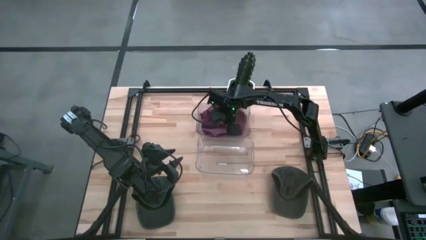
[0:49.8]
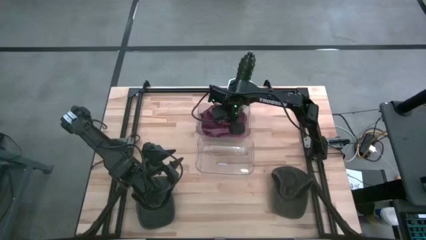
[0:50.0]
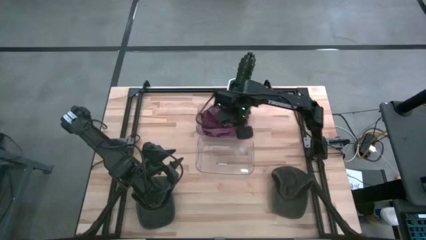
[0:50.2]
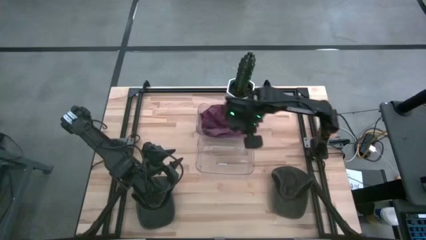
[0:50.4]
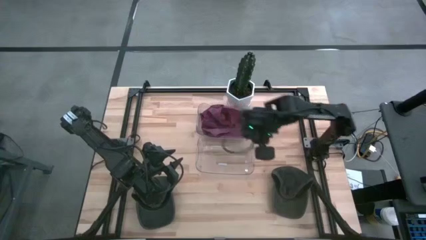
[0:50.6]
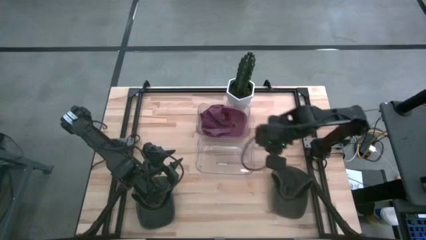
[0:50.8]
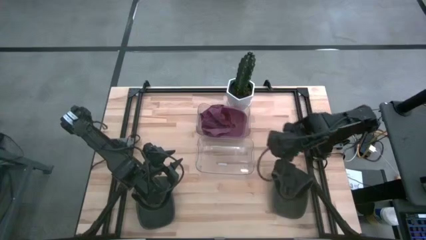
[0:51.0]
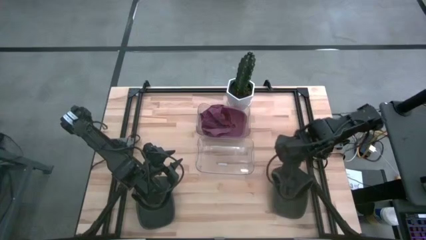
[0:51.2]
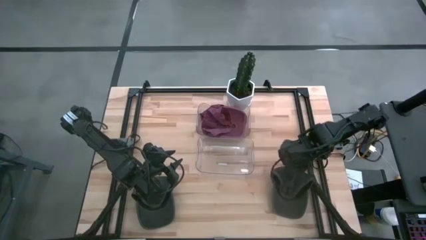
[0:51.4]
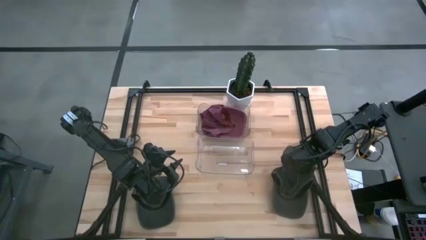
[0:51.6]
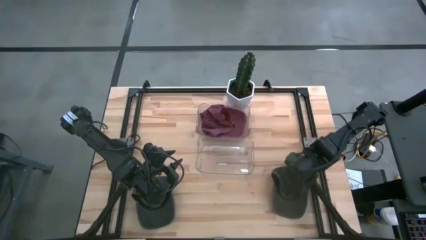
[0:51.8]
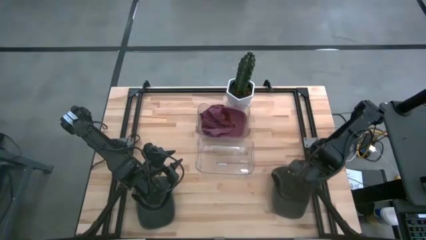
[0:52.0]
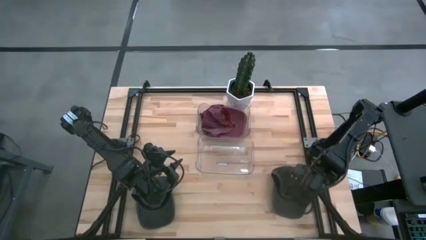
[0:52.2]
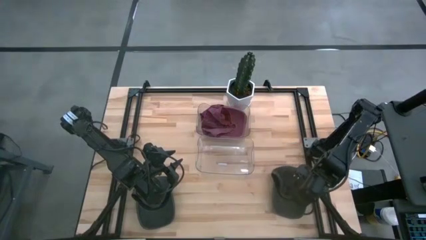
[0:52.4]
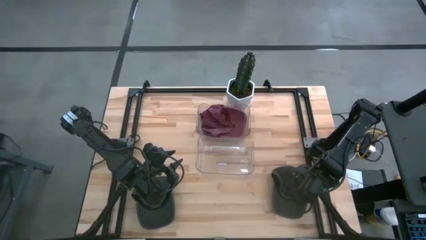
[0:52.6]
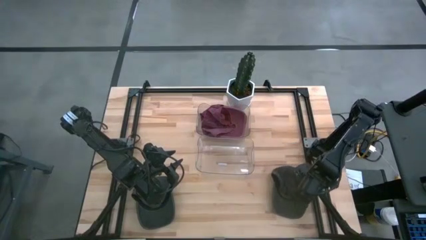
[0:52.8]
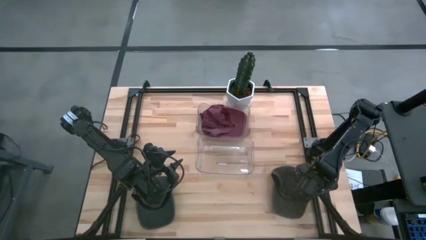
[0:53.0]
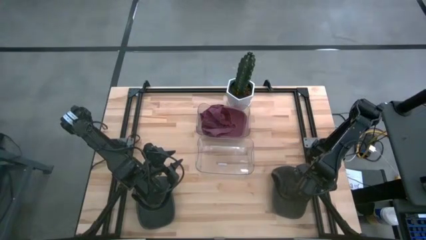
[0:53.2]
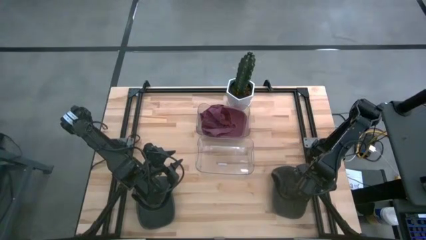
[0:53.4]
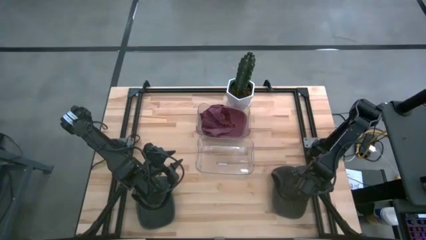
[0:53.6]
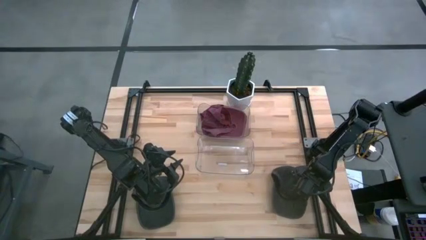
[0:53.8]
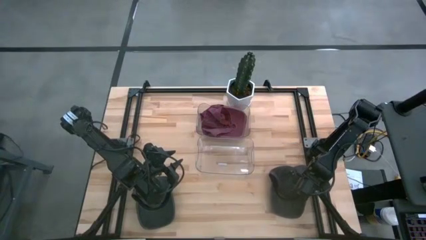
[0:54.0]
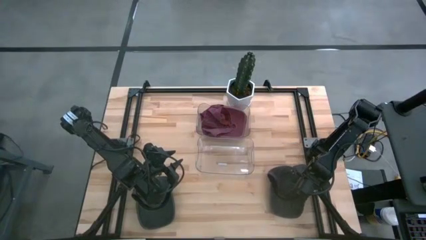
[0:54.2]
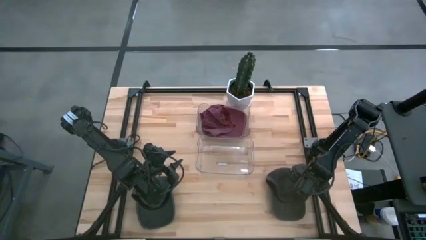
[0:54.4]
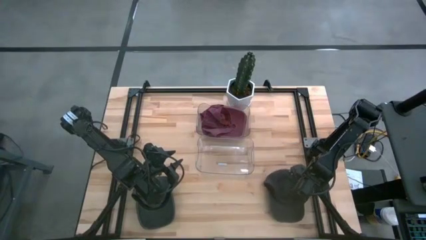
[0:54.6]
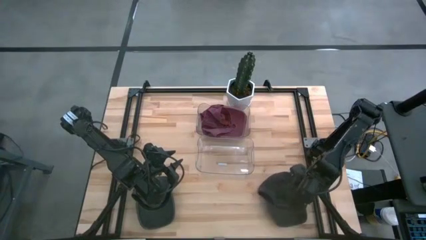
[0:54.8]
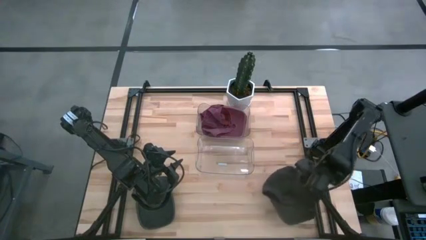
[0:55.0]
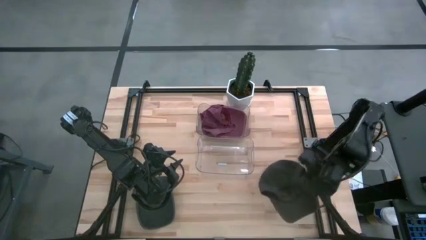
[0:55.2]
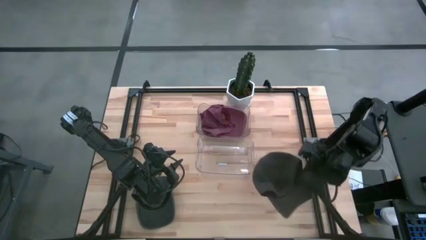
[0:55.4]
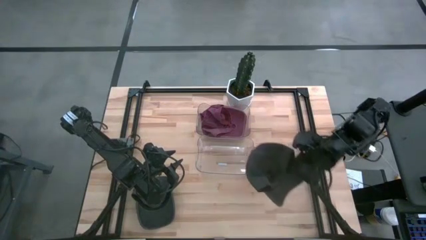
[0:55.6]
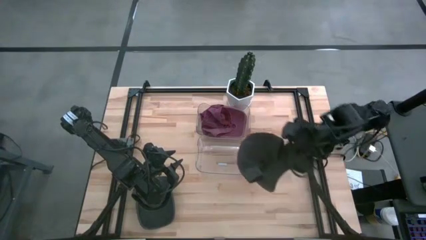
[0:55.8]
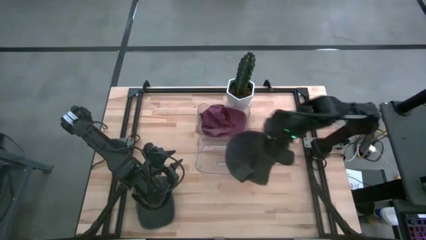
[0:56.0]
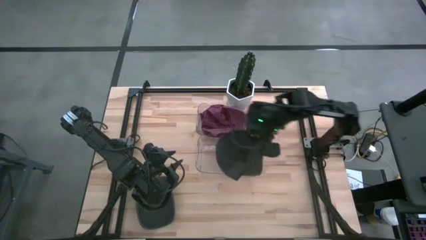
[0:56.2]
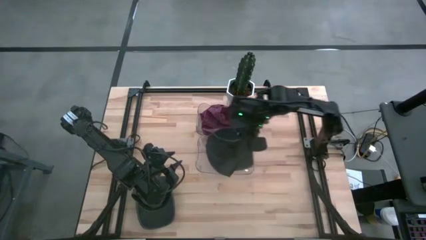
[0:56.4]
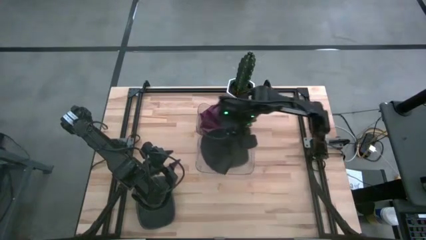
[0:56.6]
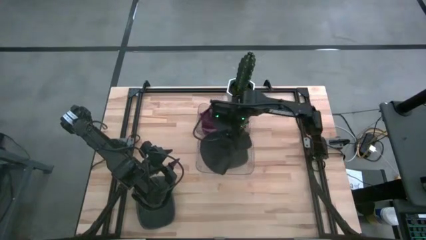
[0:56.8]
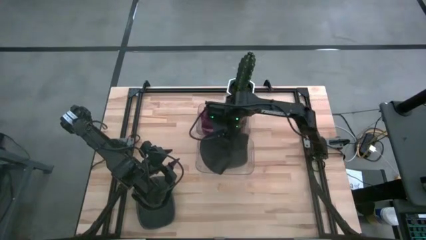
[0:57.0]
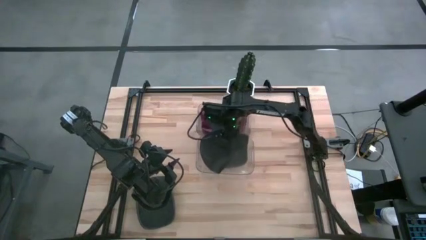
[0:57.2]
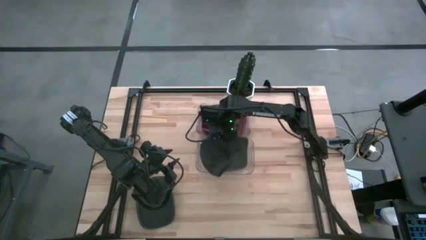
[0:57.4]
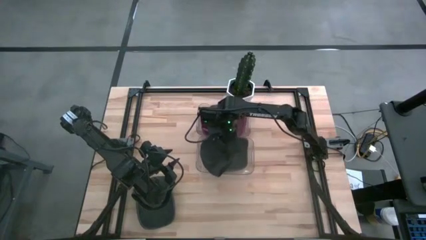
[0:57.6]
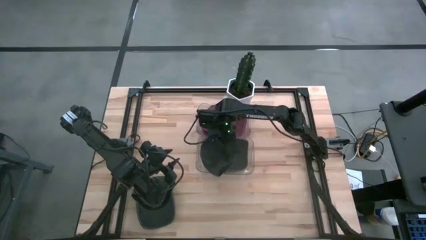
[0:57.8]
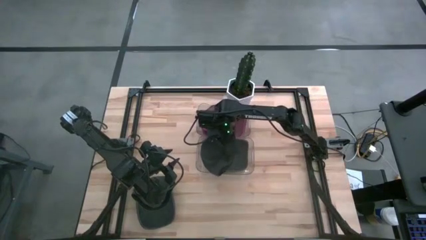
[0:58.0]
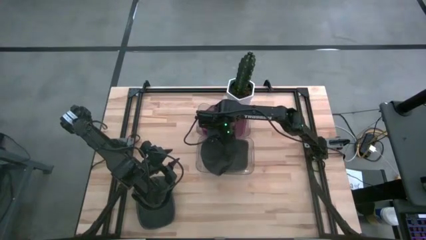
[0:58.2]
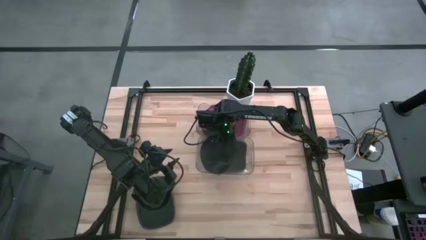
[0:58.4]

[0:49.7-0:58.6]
Task: Pick & Place hat
Put the right black cap into the bottom transparent bin

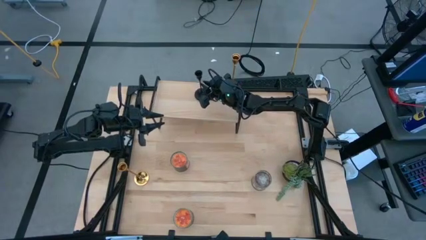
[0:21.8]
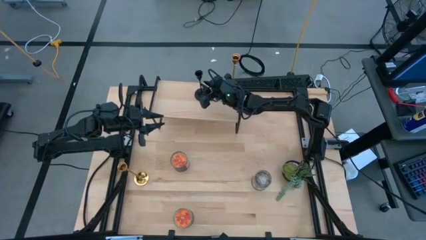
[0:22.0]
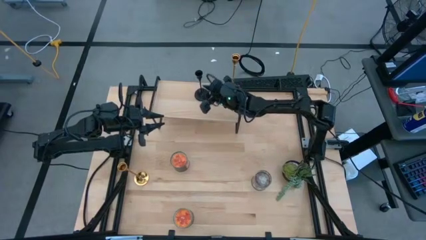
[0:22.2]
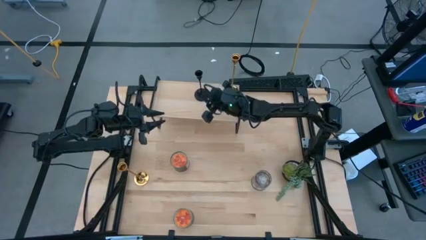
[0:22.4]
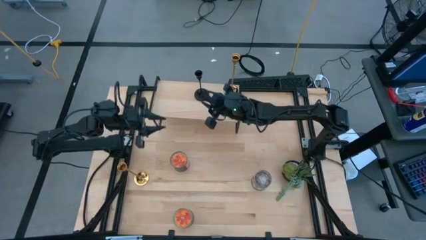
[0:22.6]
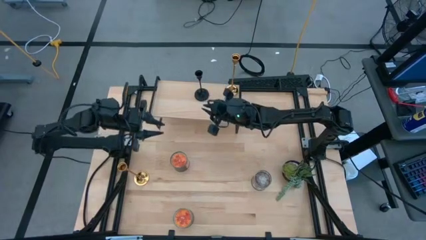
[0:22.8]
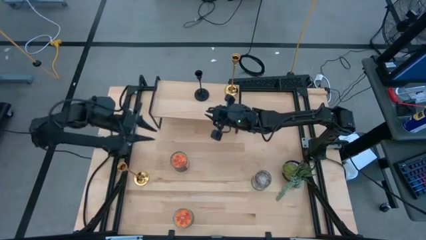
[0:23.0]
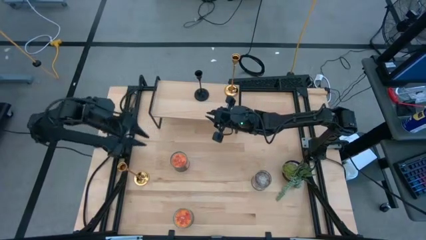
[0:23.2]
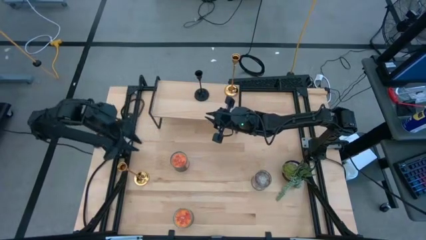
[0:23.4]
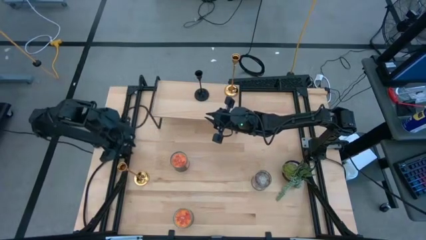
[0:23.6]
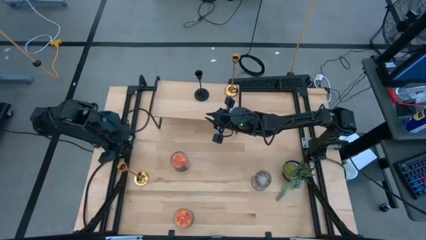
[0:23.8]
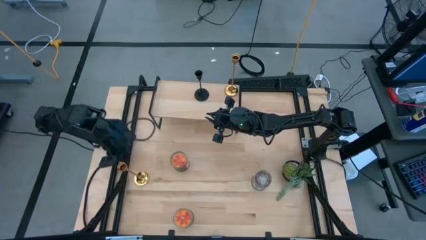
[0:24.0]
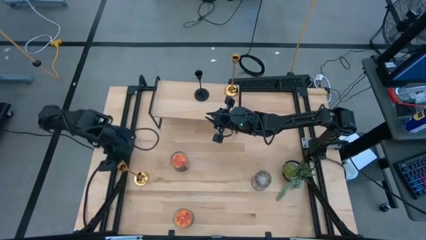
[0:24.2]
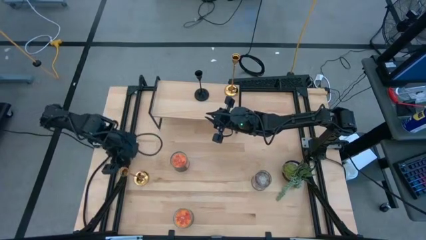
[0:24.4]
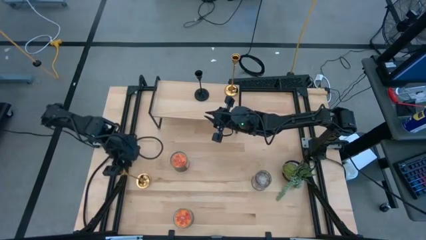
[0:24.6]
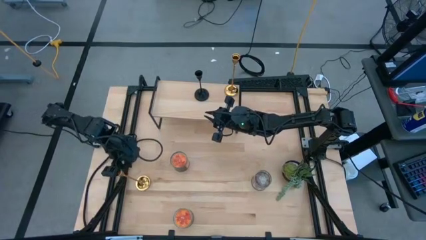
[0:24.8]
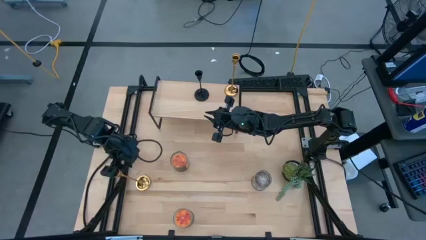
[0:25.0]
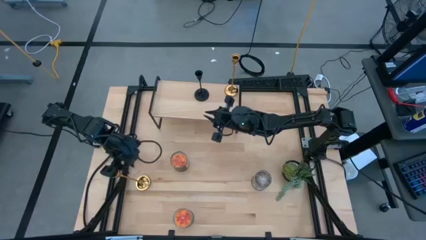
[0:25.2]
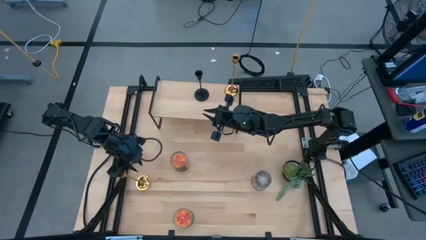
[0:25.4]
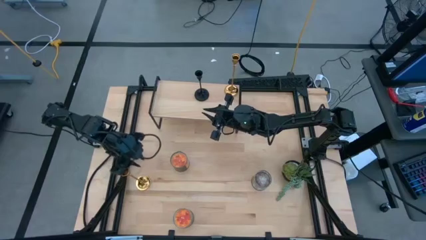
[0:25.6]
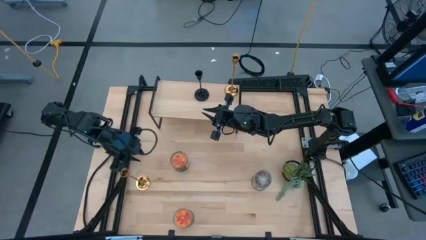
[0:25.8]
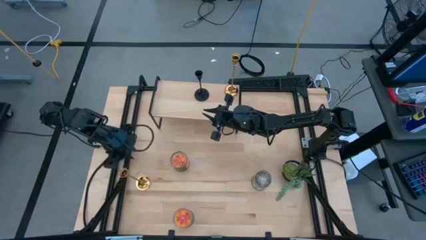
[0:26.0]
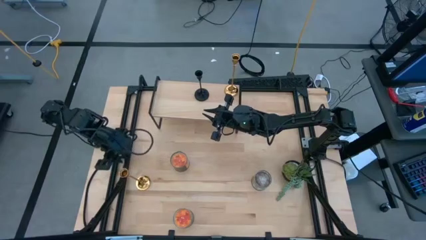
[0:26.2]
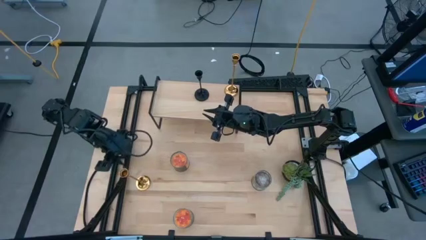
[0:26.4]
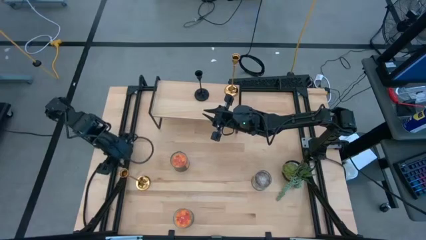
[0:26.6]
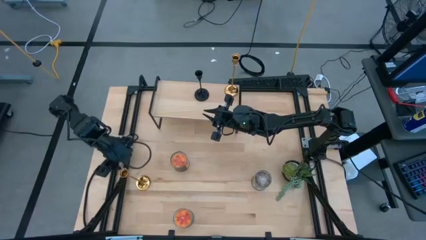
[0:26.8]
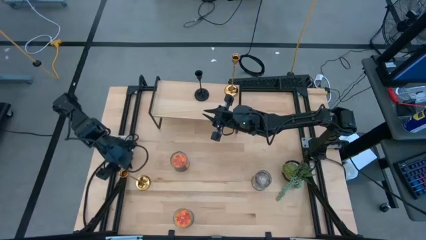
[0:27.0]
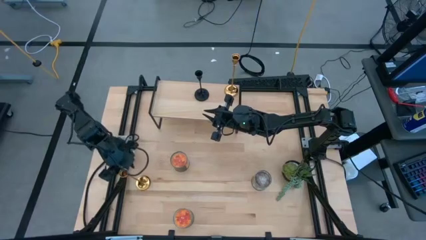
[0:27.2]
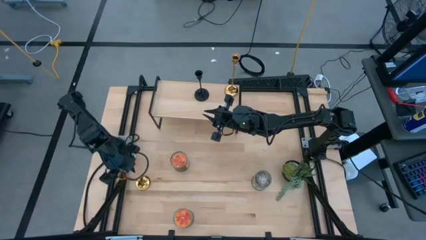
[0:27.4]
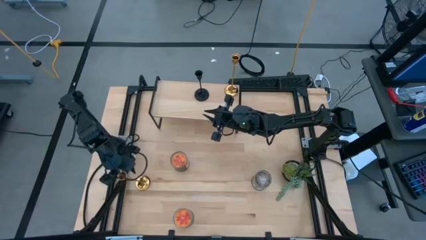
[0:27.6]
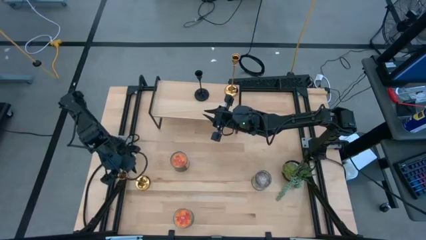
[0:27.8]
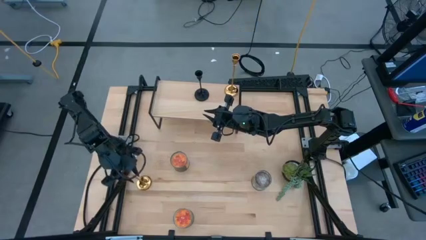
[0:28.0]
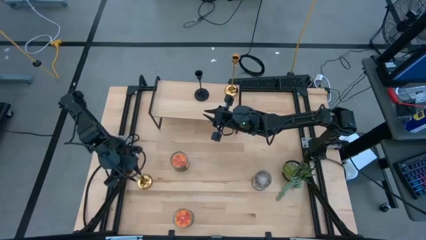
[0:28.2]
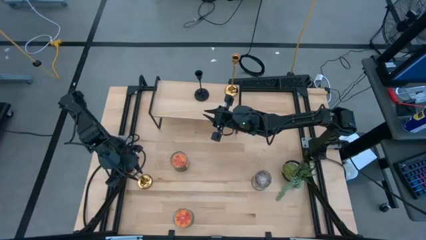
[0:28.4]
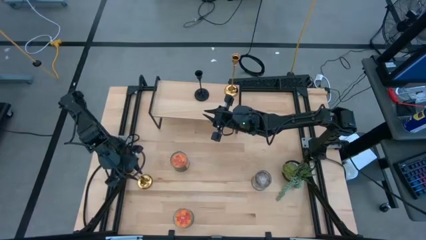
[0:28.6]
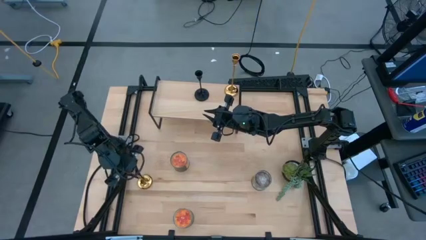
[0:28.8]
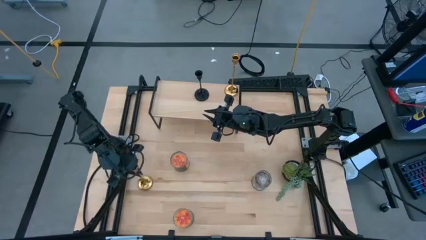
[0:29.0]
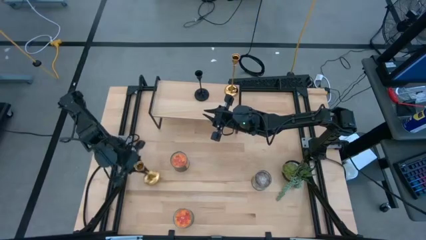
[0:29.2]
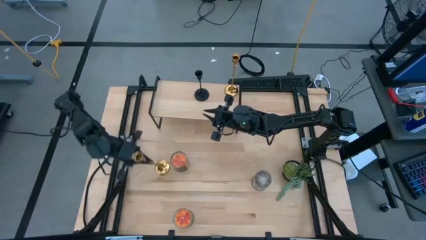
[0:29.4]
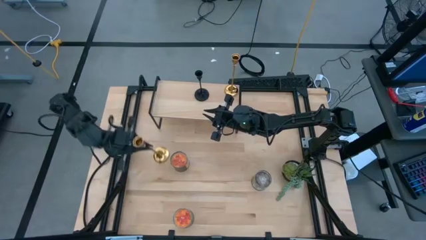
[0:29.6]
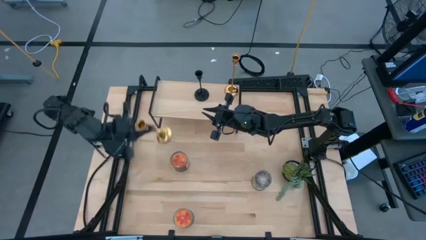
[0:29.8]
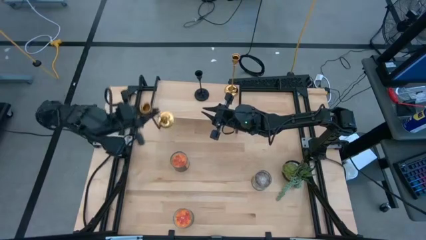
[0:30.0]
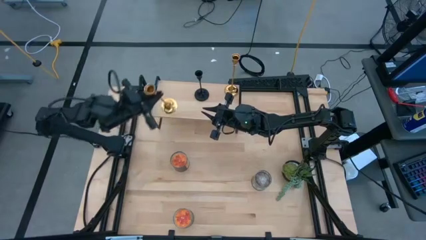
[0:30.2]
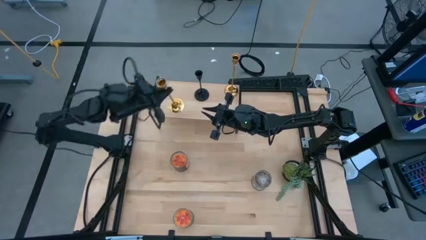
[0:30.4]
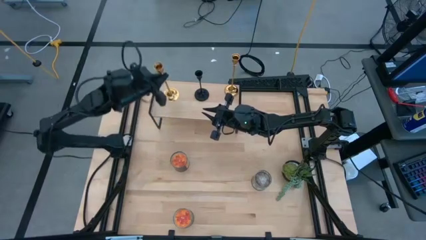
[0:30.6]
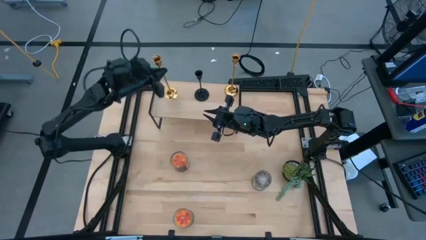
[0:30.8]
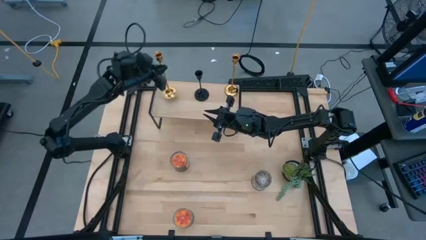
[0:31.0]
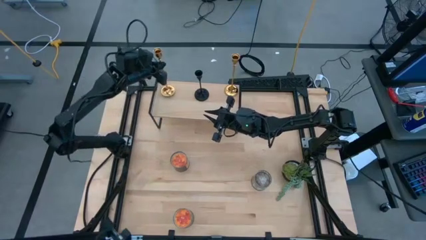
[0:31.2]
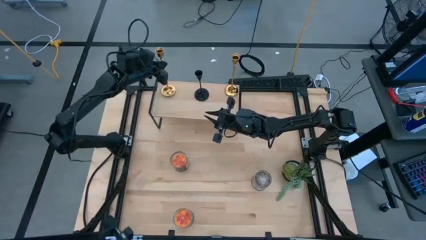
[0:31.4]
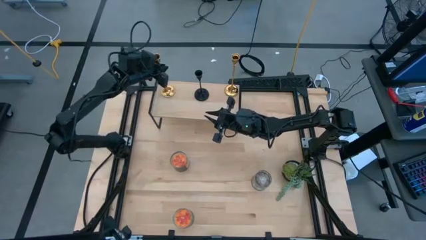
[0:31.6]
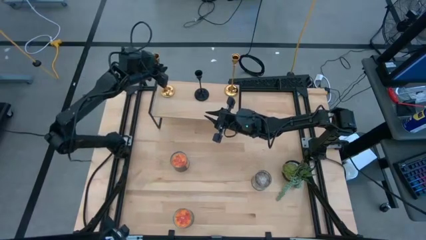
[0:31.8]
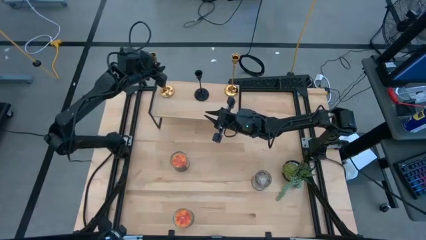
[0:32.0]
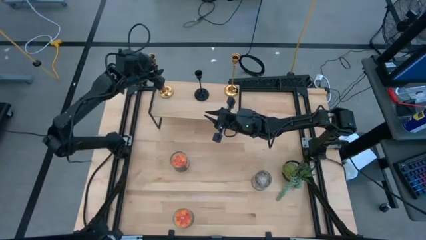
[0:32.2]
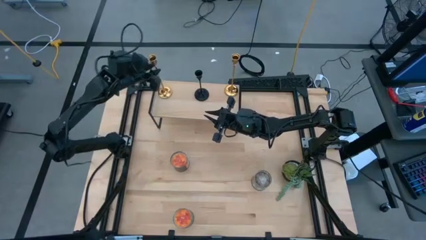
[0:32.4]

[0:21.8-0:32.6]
Task: Pick & Place candle stick holders
Put the golden candle holder on the shelf
